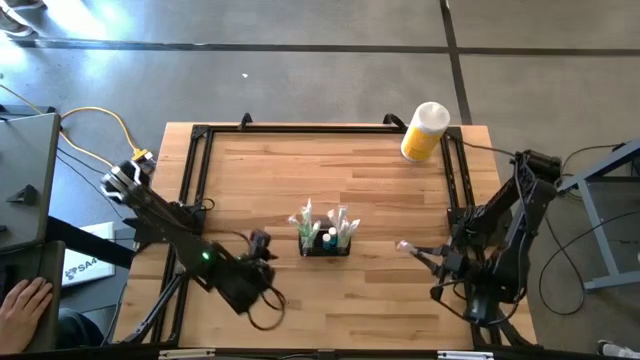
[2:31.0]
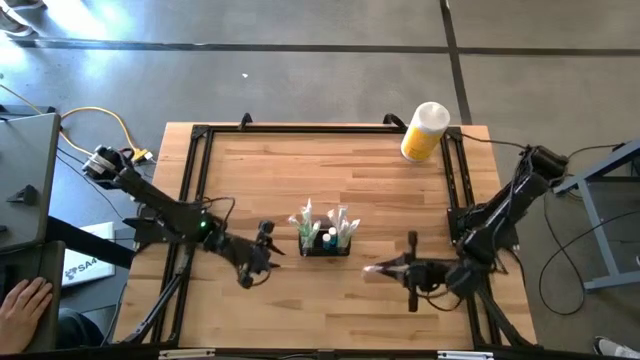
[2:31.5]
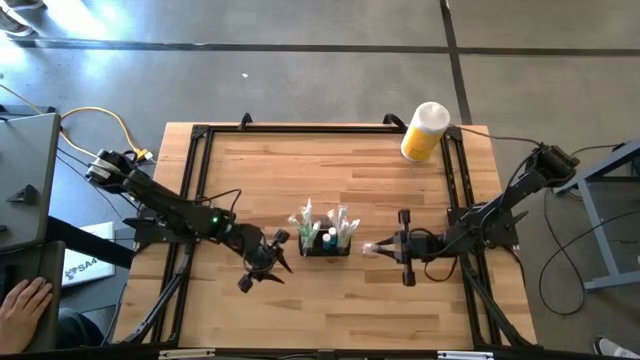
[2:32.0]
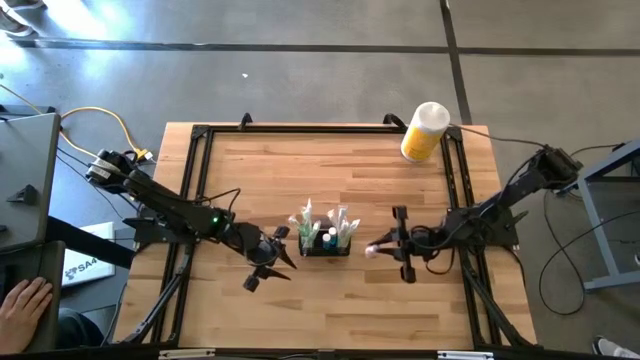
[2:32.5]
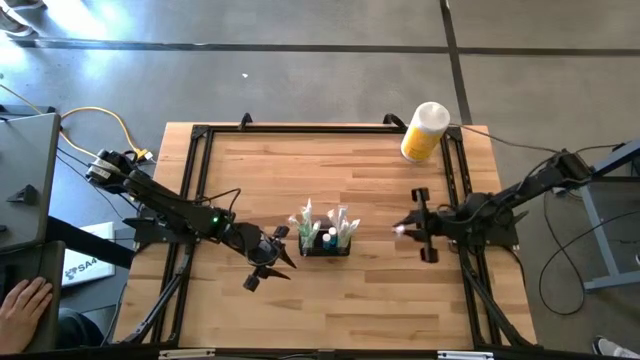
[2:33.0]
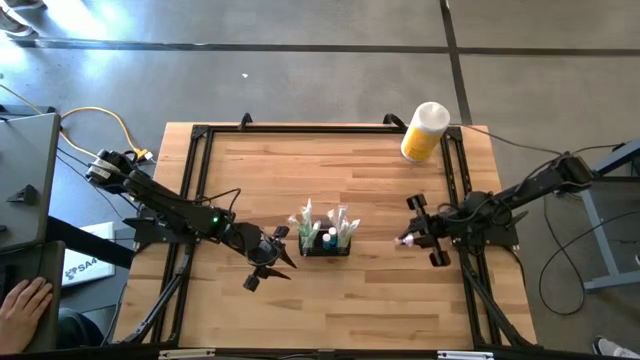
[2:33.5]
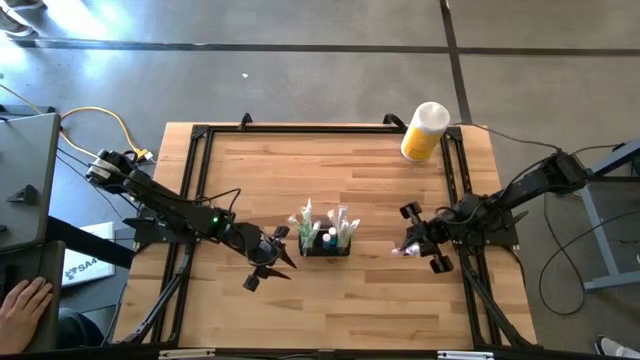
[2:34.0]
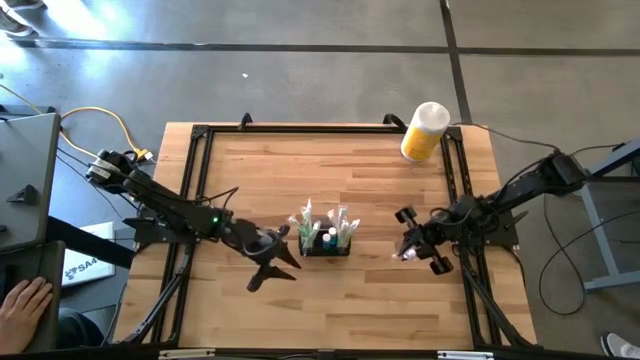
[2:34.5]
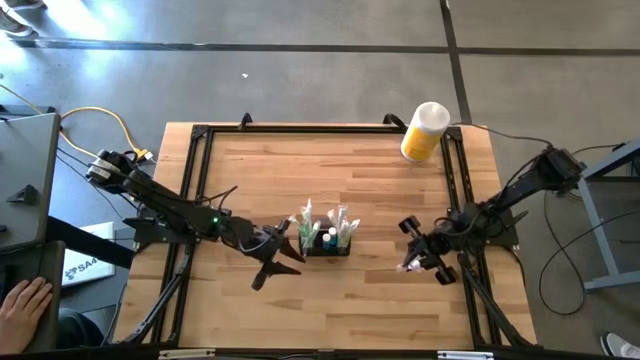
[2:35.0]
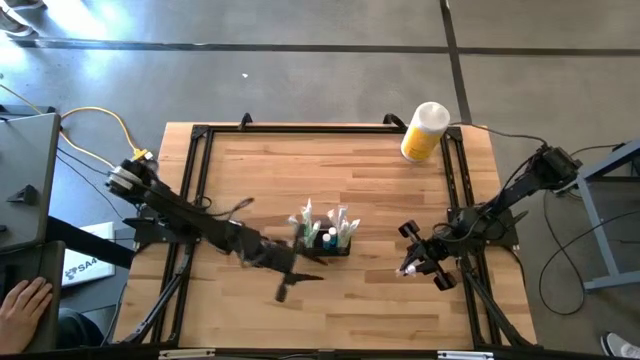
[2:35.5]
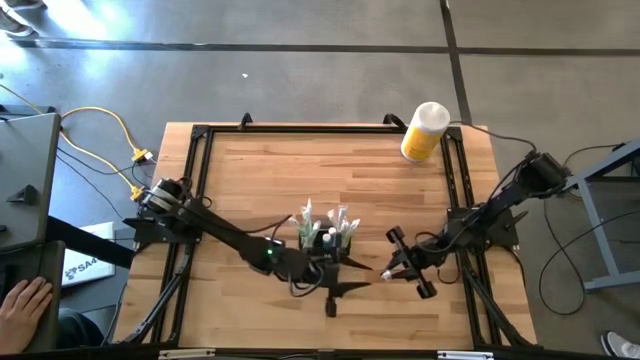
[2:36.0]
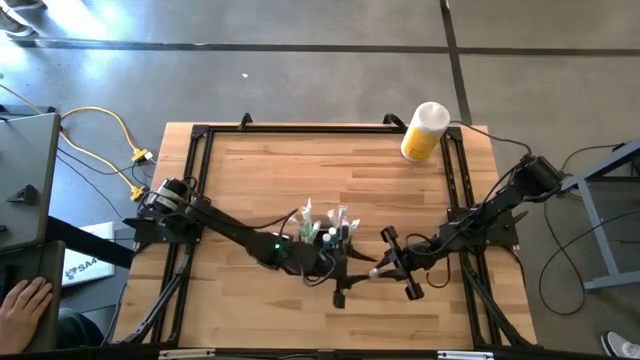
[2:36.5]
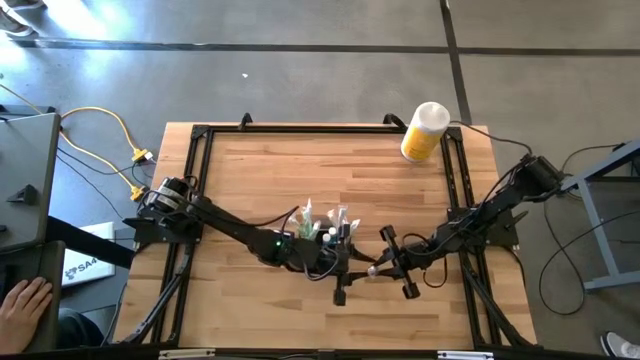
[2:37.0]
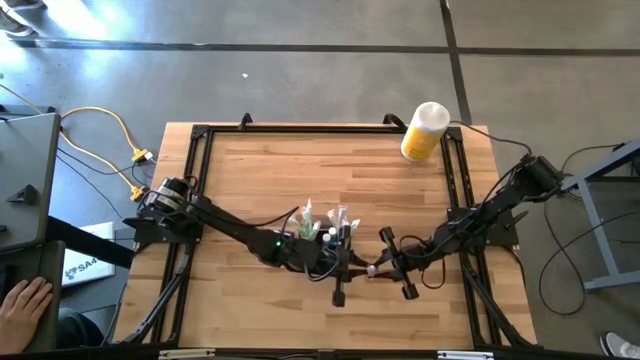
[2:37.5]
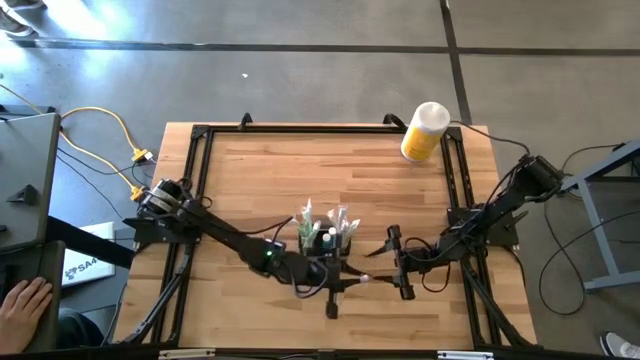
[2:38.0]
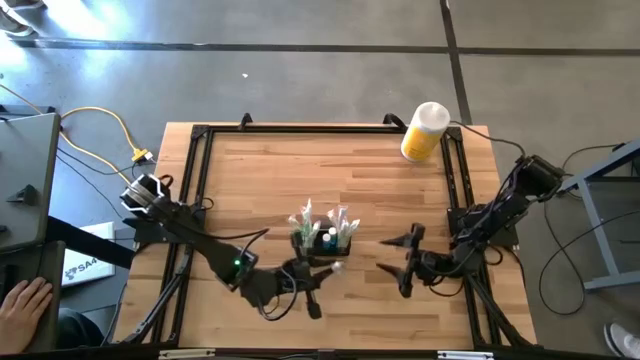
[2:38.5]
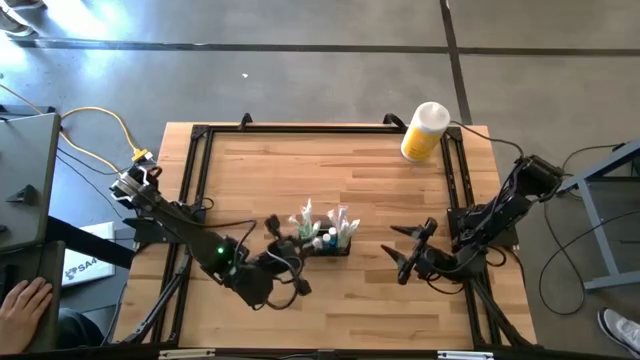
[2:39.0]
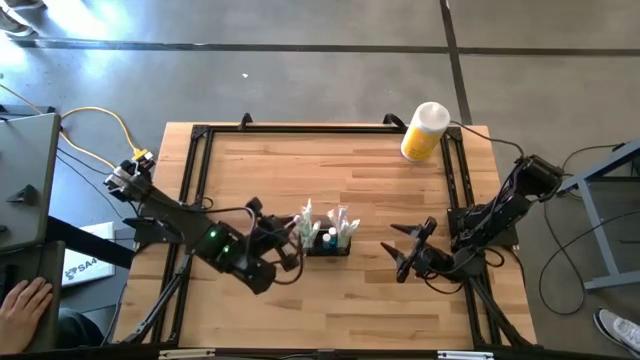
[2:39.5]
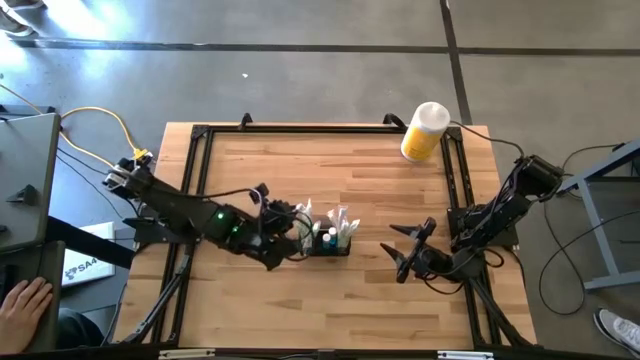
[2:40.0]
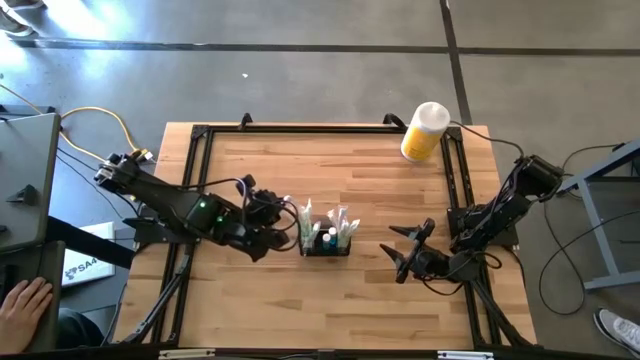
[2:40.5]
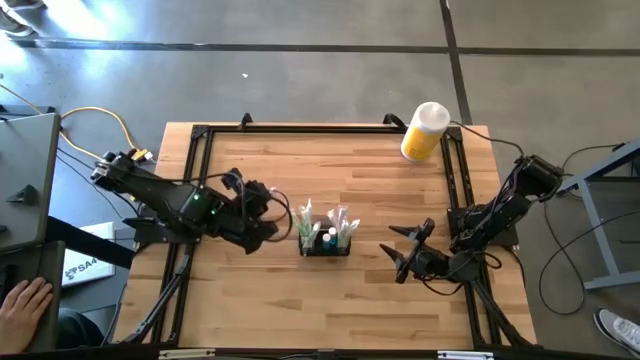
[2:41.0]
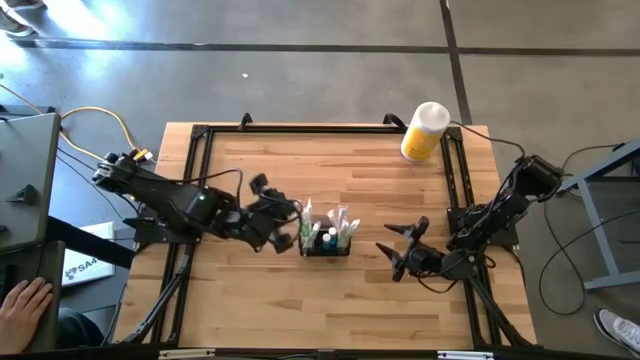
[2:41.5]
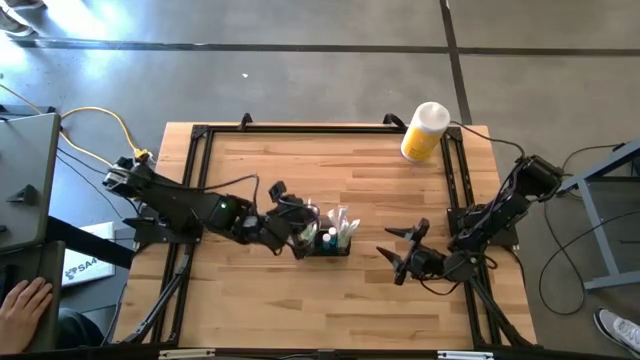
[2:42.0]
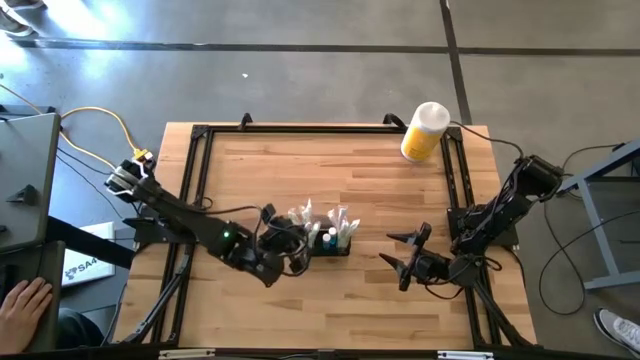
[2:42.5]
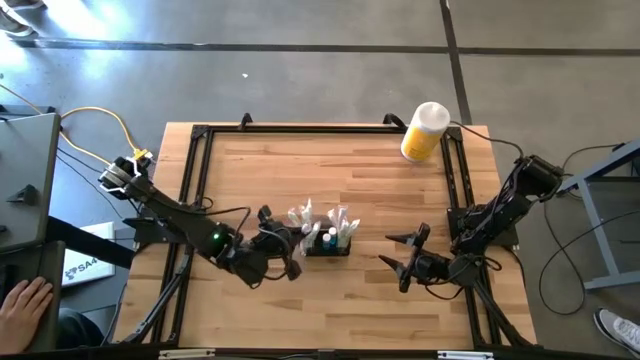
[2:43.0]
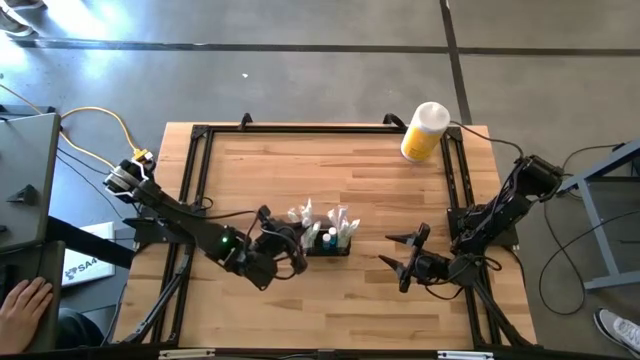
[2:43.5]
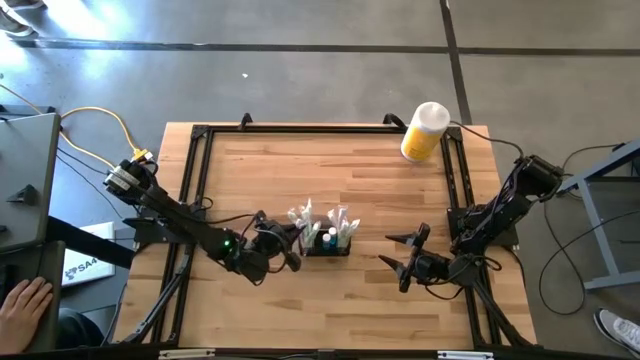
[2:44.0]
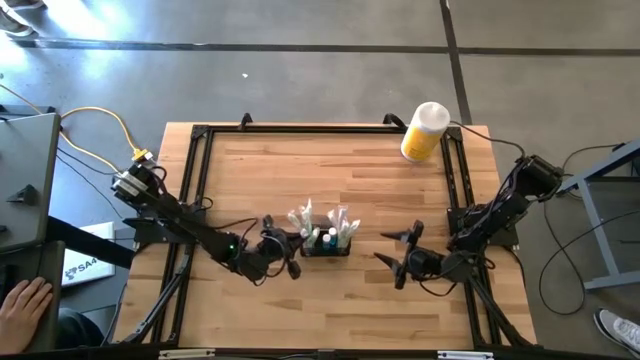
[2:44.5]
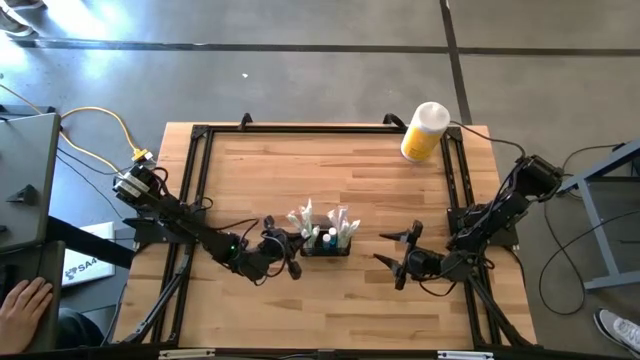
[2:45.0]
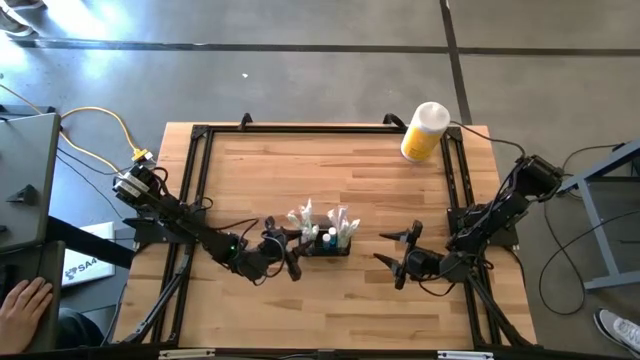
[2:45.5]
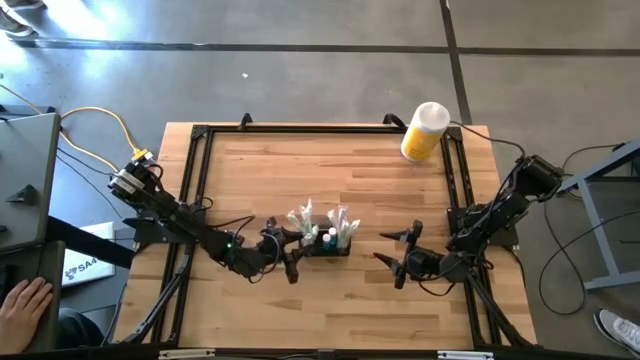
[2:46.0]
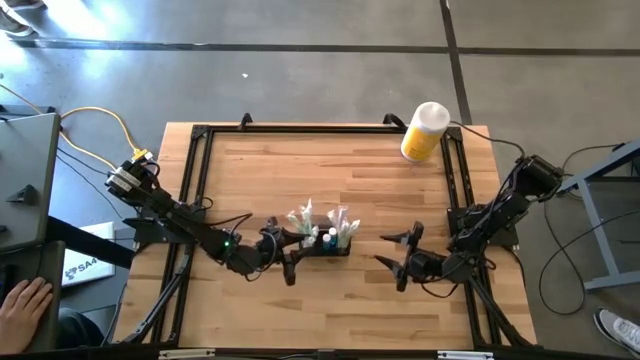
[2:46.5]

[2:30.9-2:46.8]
Task: Pick & Place toothbrushing station
Put the violet toothbrush into the black wire organizer
